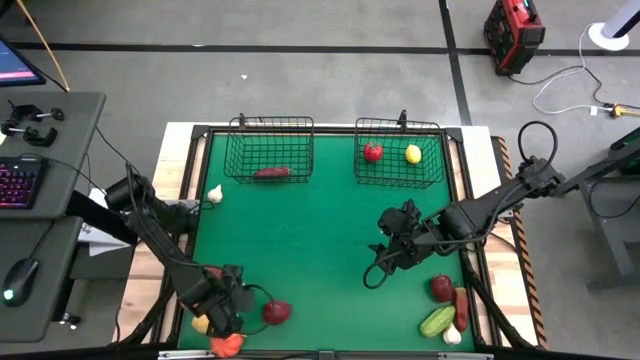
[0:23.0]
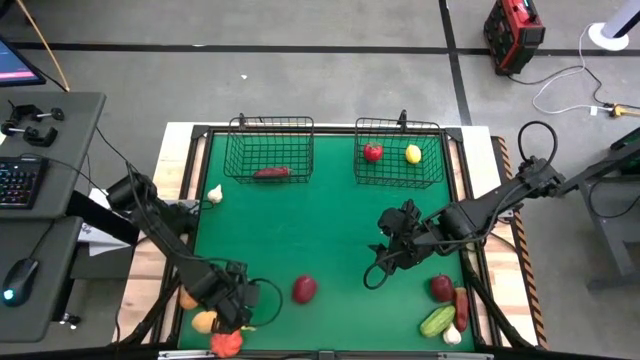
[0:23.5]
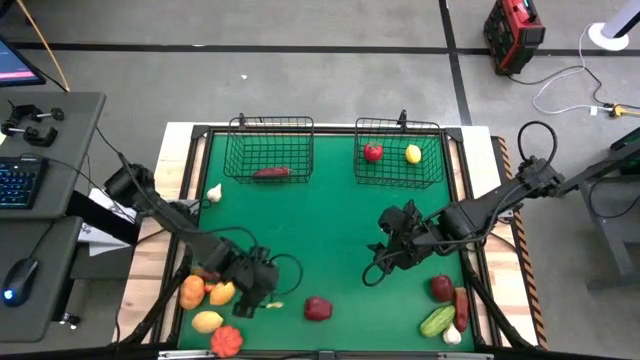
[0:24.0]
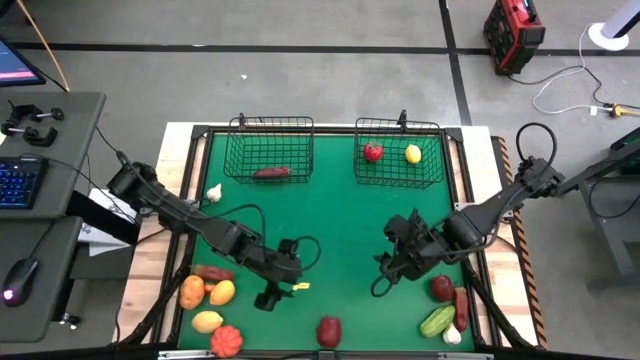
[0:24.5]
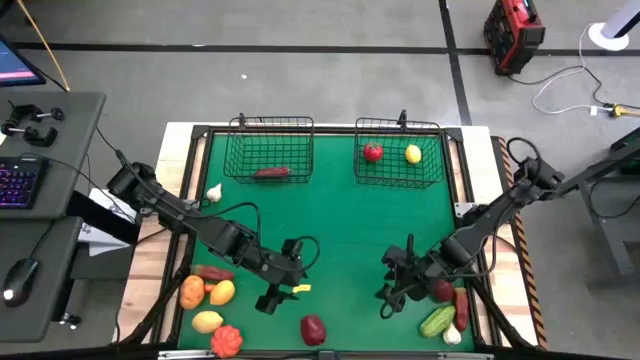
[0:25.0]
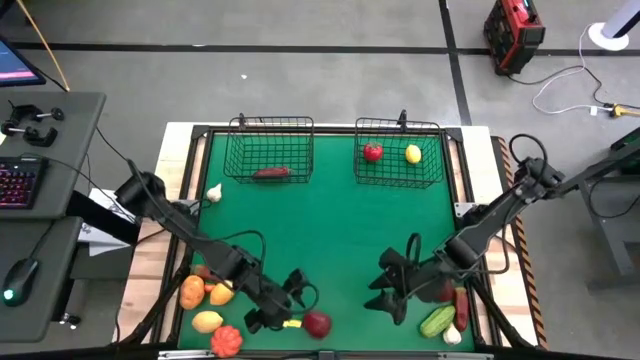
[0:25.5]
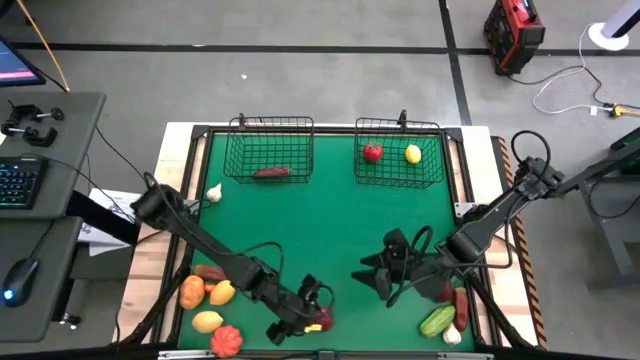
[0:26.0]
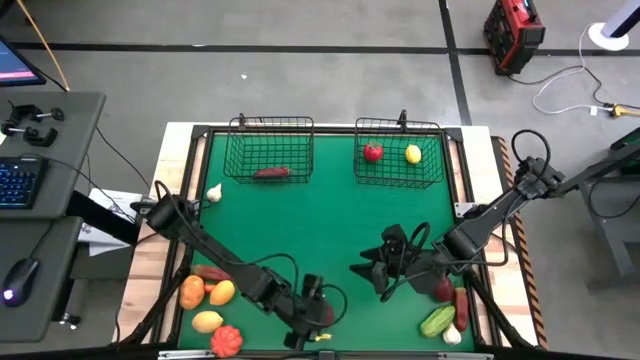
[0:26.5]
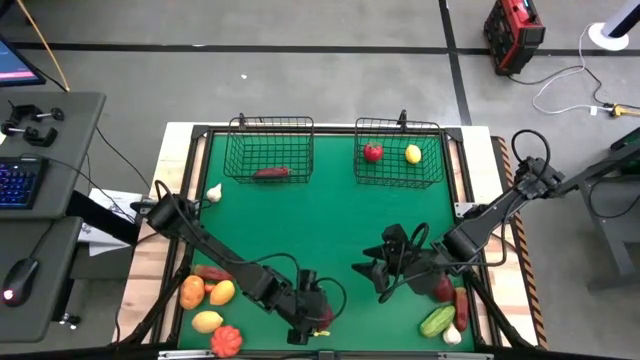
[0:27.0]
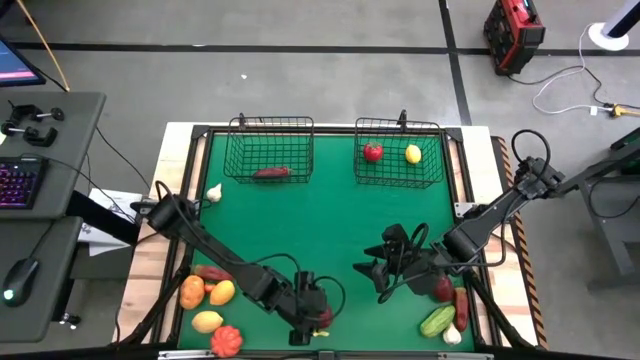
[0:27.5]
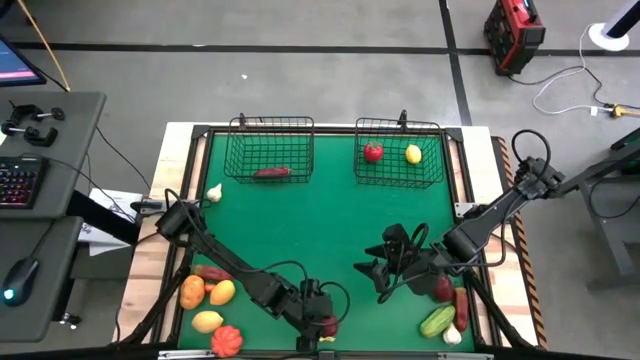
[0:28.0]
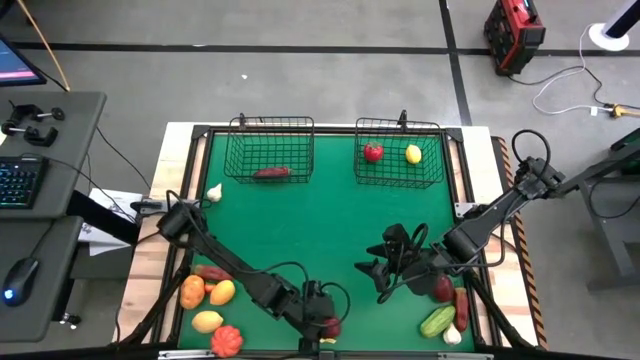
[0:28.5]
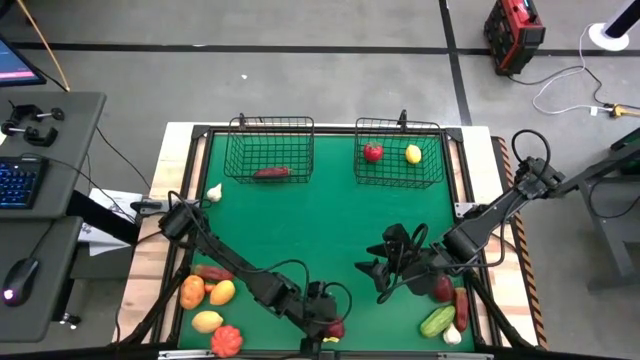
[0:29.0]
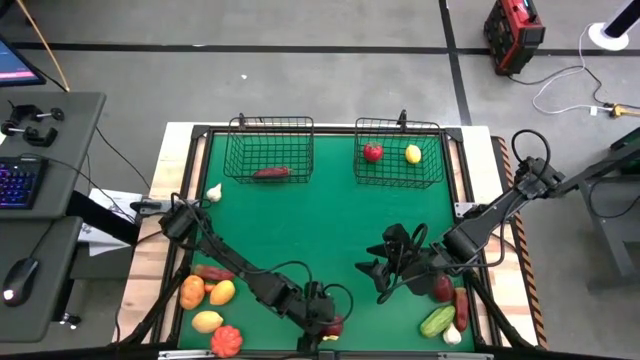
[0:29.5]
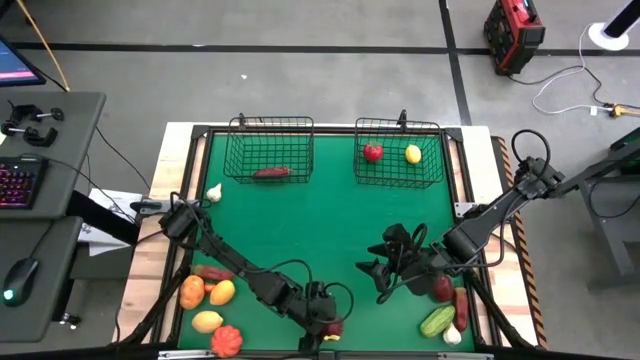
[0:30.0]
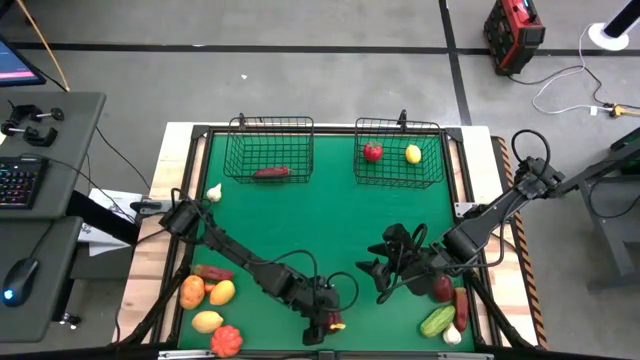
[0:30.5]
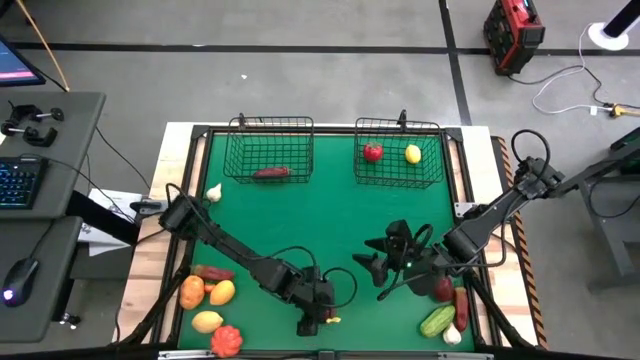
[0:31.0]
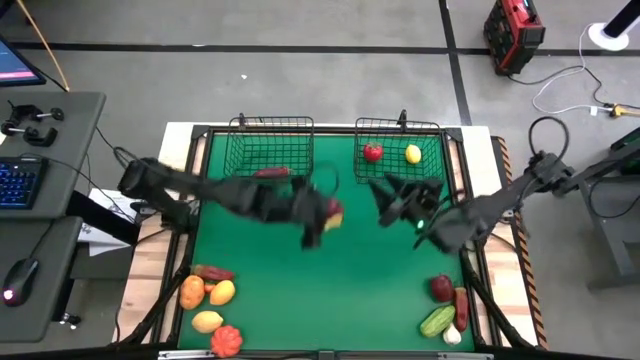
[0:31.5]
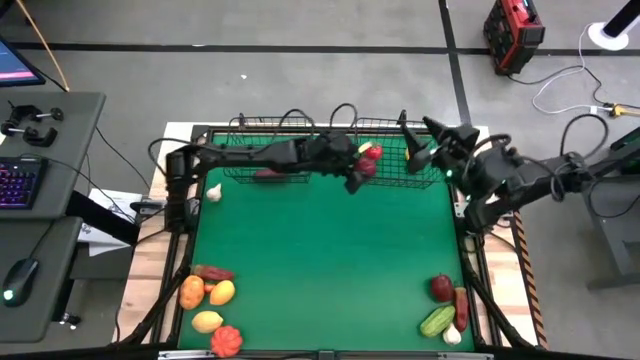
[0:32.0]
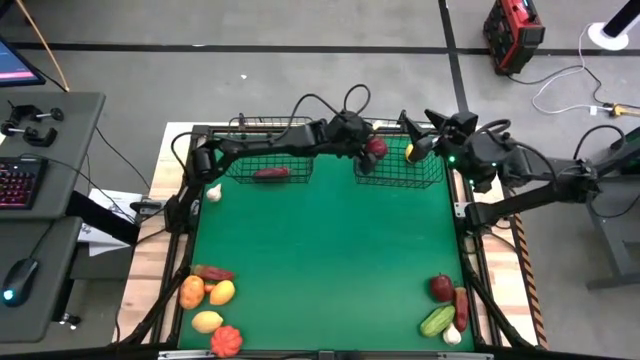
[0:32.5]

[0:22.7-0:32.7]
Task: Sort produce into baskets
Put the left red apple into the right wire basket

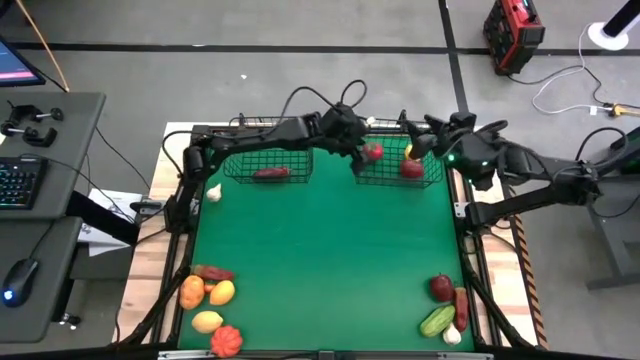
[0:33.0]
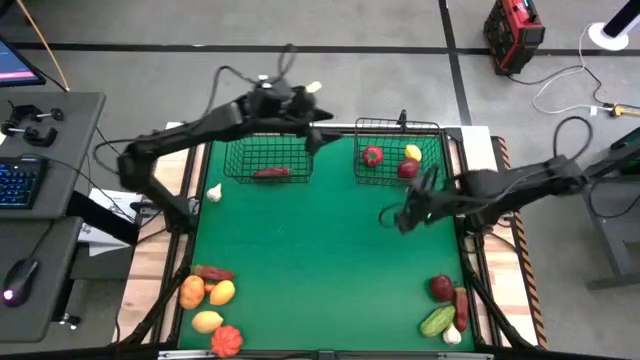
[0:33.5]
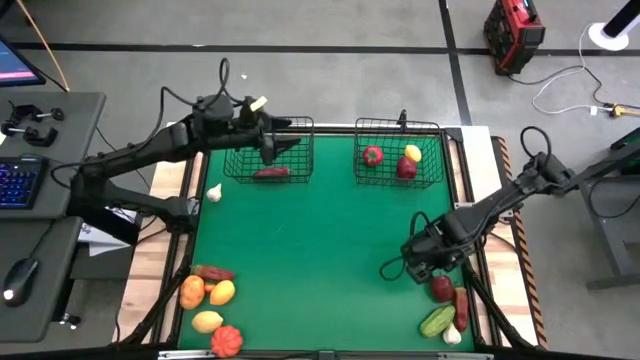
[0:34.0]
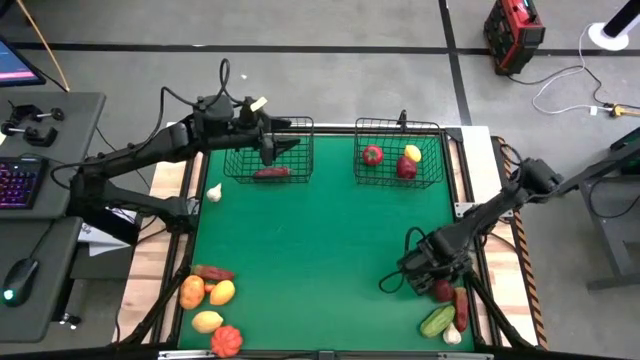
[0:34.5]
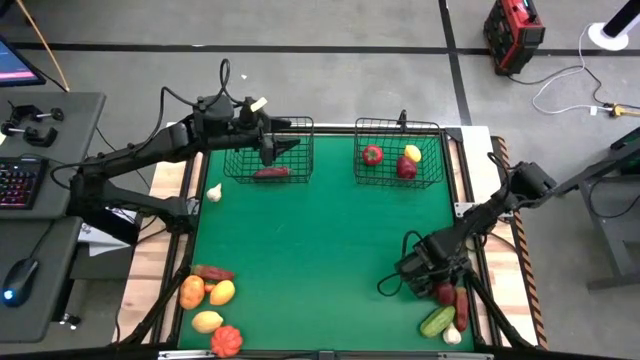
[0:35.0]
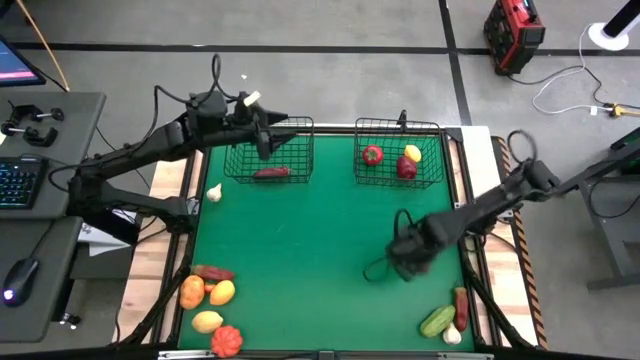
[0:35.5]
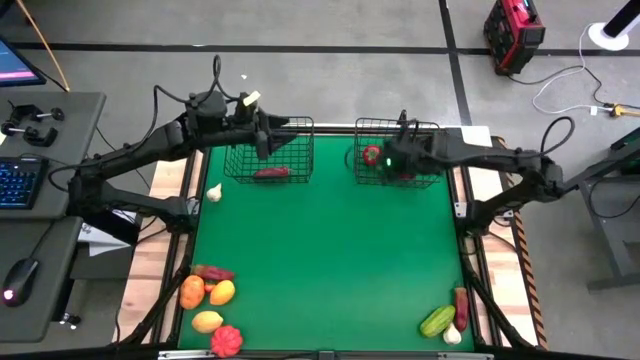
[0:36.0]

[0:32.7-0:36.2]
Put the red apple in the right wire basket

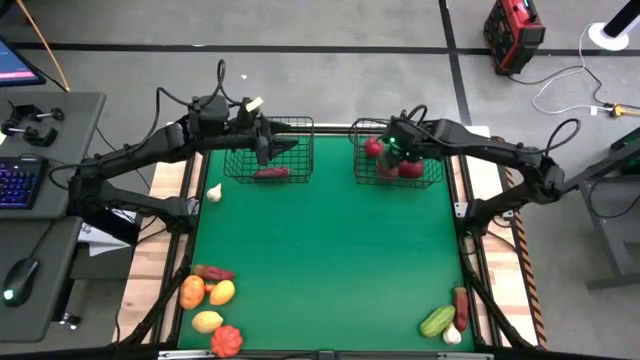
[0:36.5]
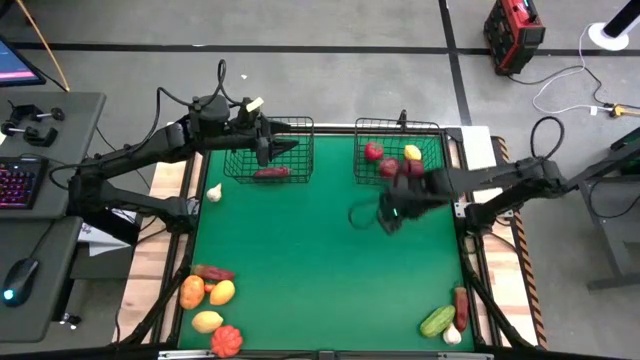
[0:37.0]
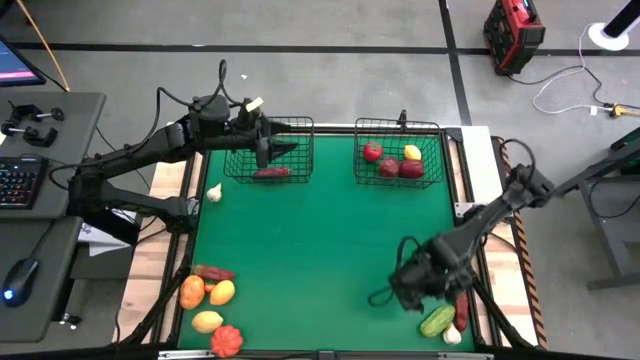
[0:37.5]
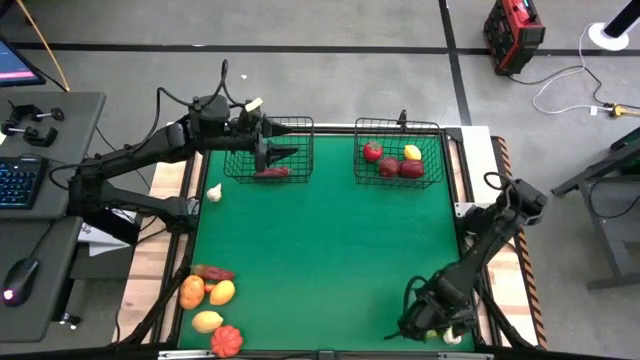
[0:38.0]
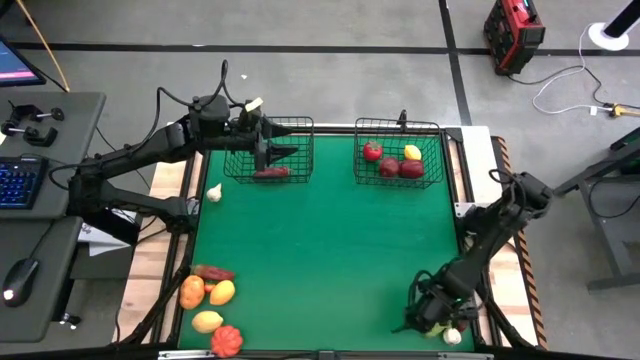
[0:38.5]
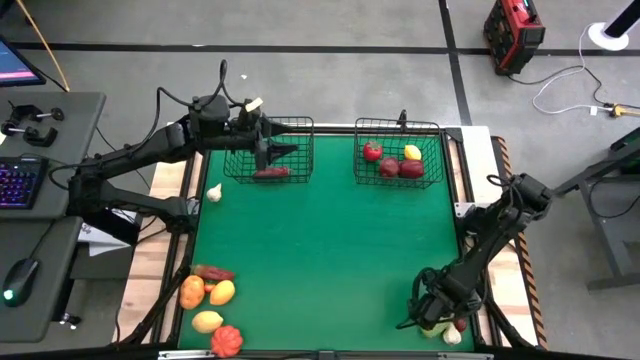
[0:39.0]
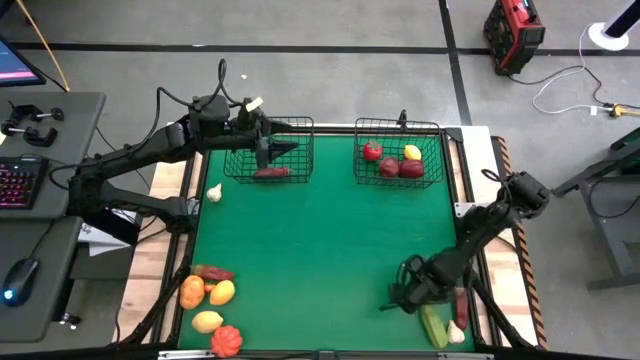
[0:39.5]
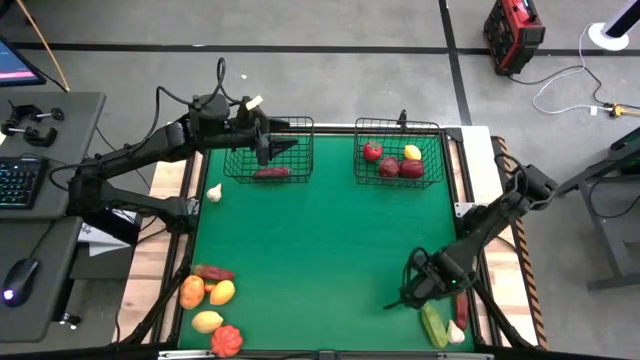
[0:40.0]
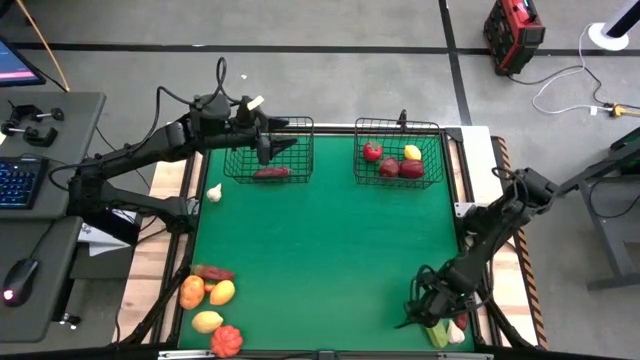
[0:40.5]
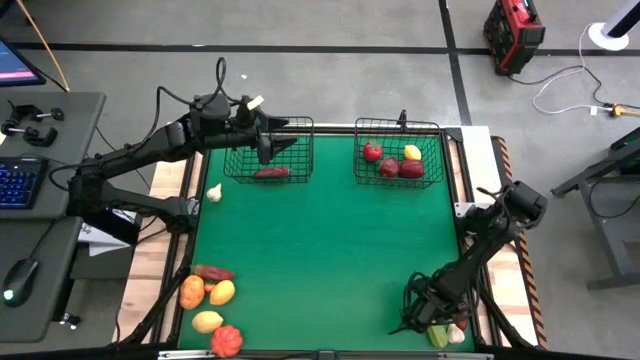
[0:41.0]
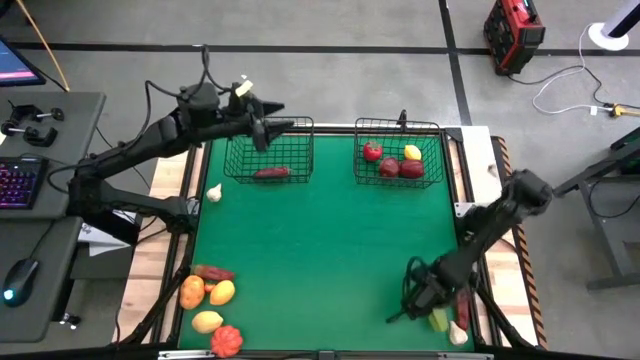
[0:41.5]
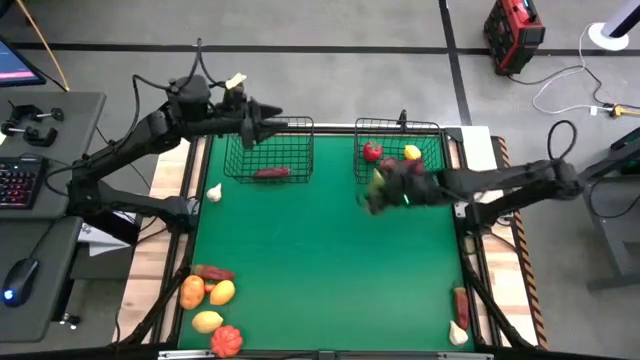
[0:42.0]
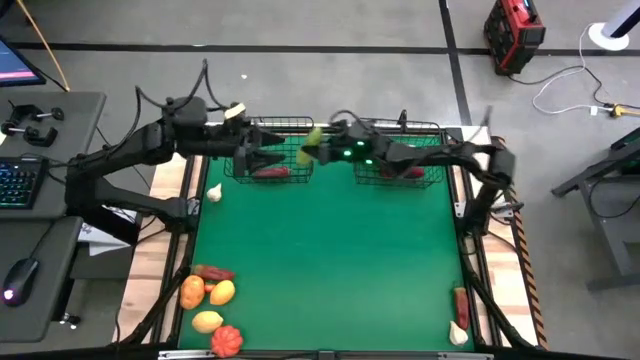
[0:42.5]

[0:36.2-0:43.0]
Put the green cucumber into the left wire basket

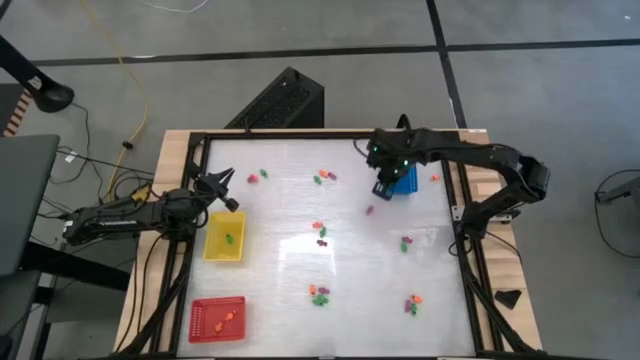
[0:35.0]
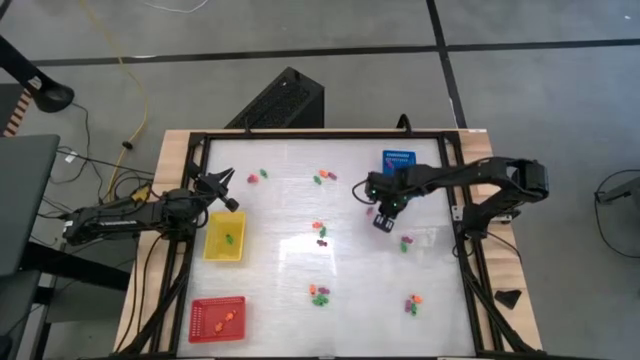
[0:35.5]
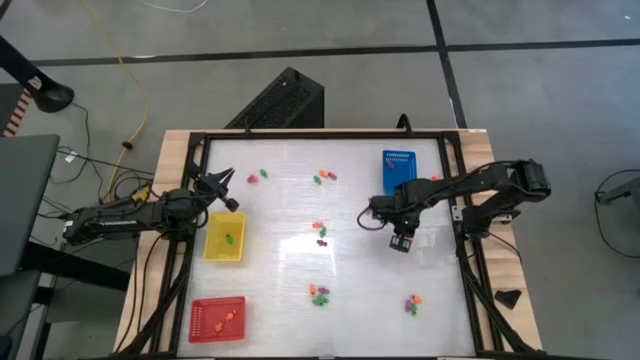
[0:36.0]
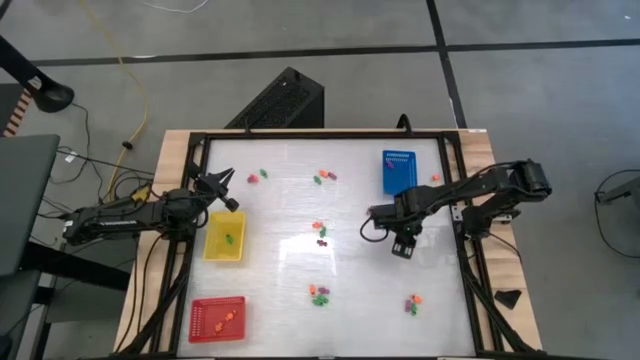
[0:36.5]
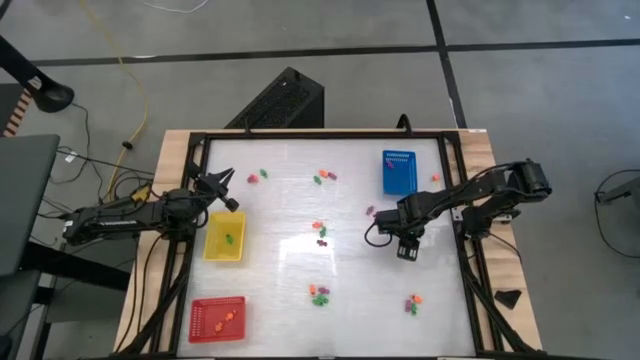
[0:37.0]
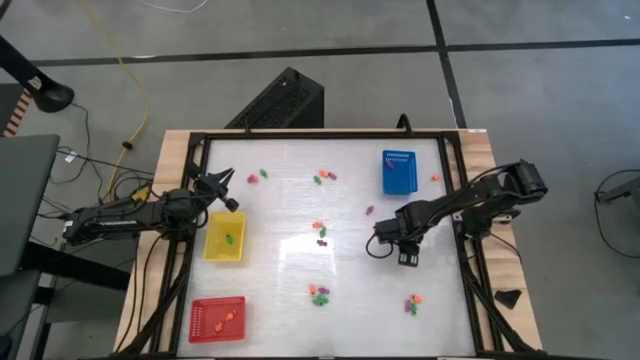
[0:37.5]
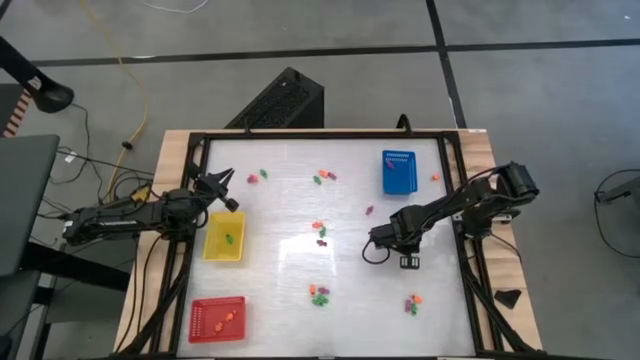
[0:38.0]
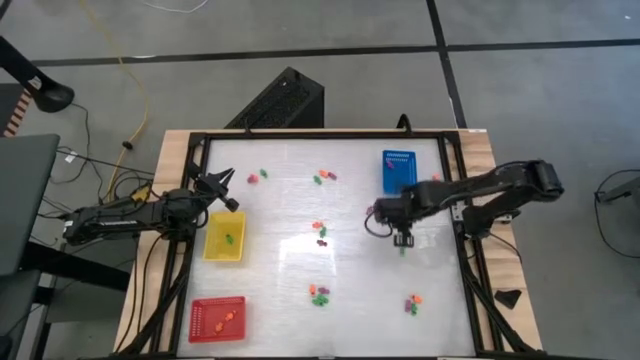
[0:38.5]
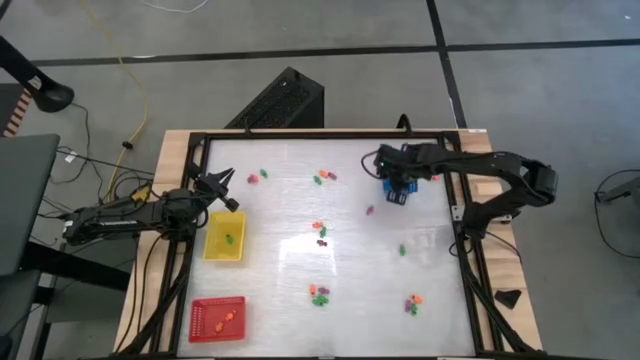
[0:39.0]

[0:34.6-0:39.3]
Task: Sort Halloween decoration
Put the purple skeleton toy into the blue bin
